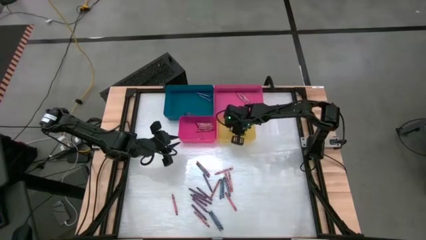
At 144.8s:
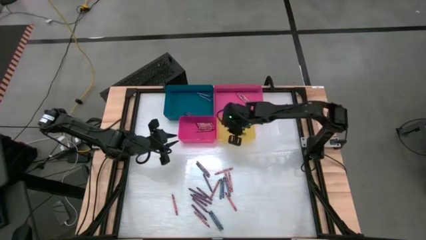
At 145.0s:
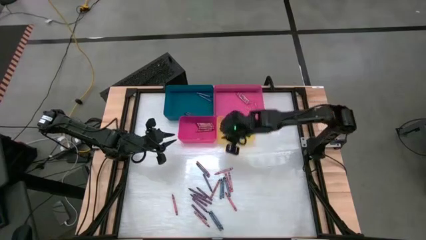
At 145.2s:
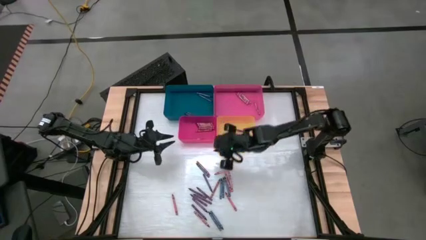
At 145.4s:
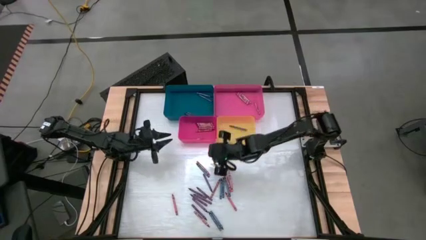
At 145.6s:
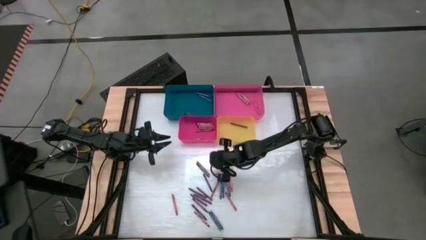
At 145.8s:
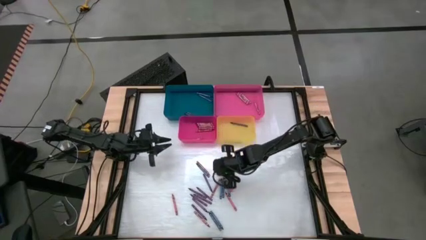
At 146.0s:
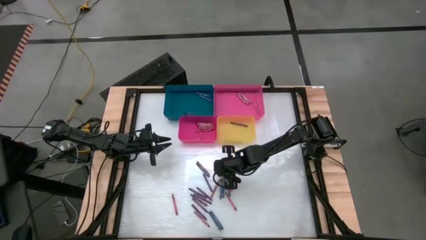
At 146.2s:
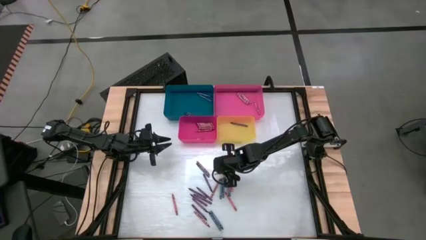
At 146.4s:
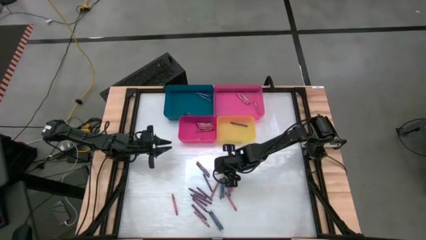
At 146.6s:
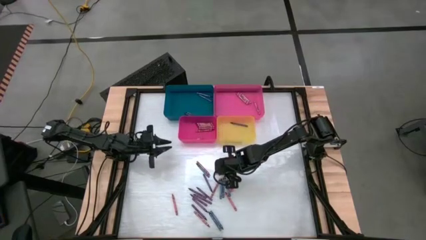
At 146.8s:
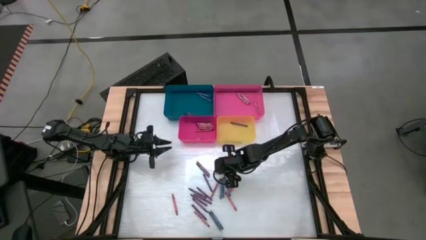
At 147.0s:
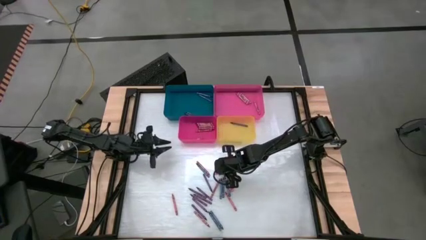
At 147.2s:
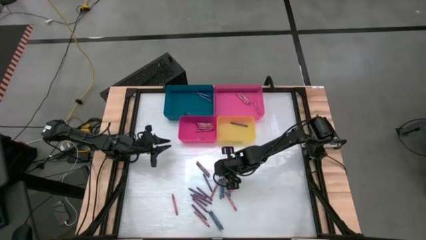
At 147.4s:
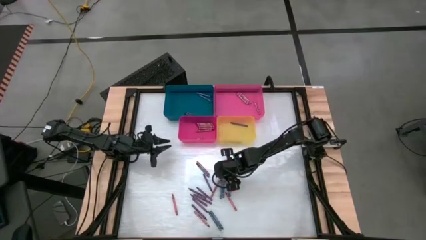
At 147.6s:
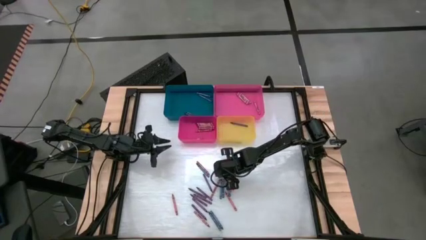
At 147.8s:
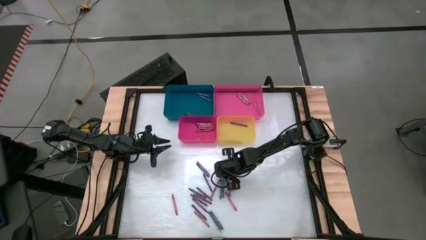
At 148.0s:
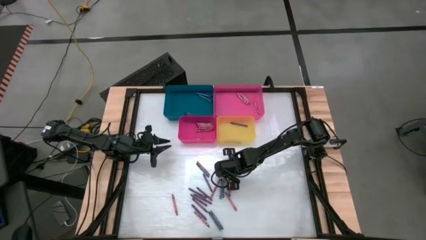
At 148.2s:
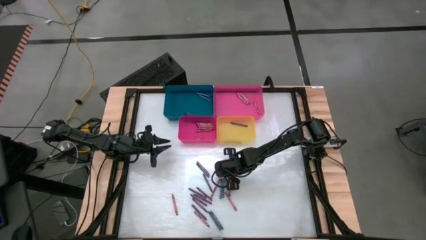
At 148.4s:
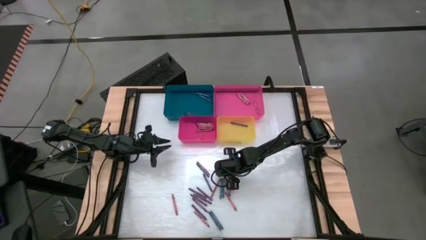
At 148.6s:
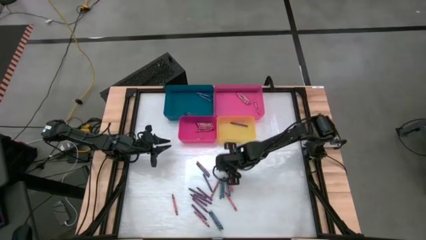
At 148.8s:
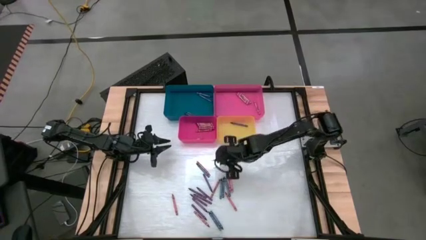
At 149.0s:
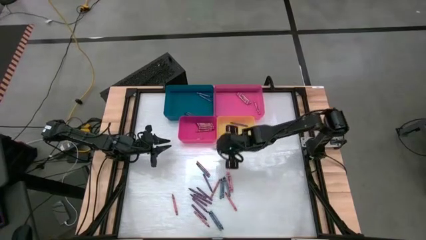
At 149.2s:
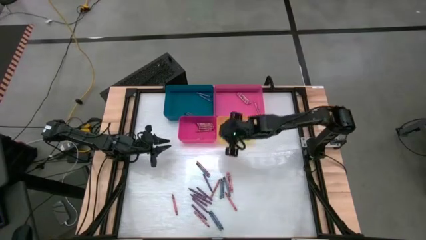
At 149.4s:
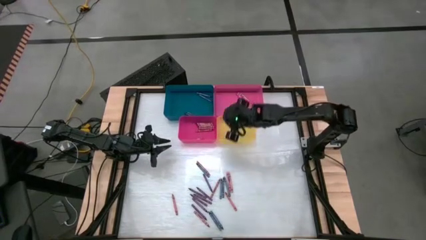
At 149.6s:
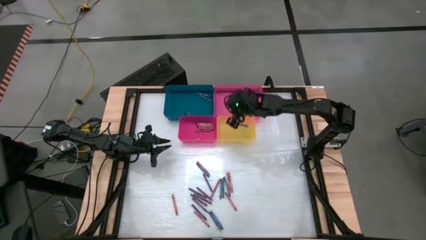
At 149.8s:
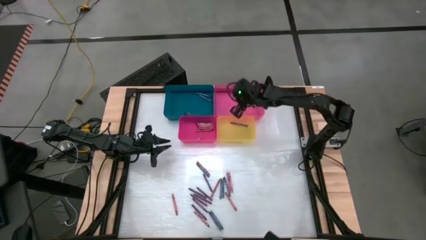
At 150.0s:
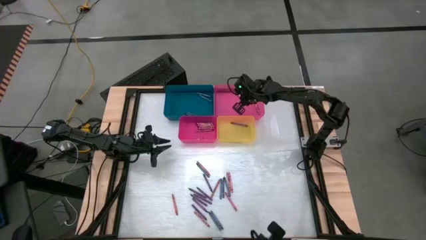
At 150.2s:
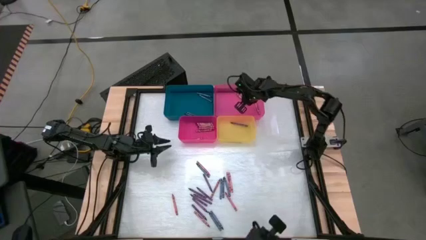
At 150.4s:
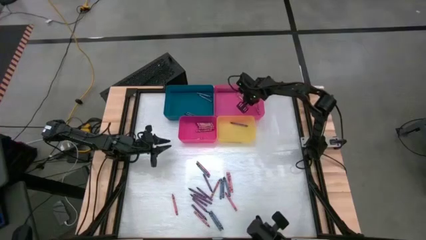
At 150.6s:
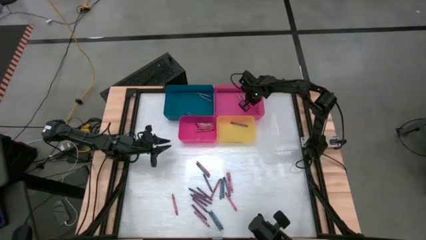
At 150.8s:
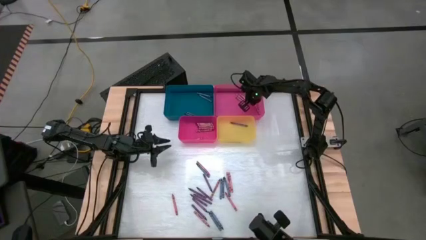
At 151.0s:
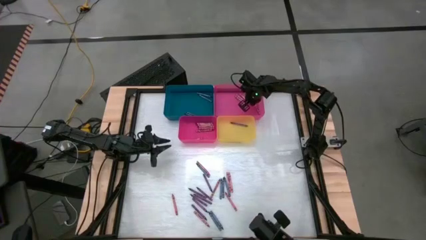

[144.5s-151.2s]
Task: Sort crayons
Put the pink crayon into the pink bin

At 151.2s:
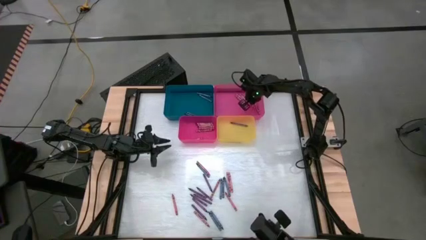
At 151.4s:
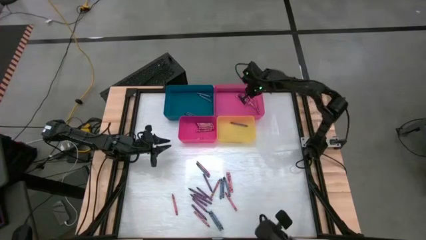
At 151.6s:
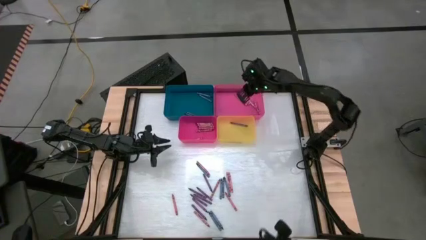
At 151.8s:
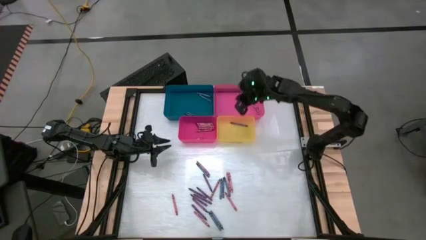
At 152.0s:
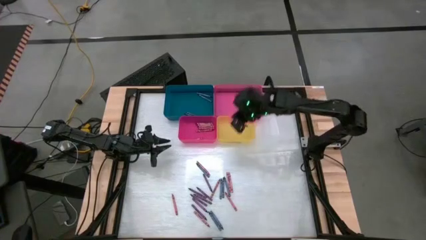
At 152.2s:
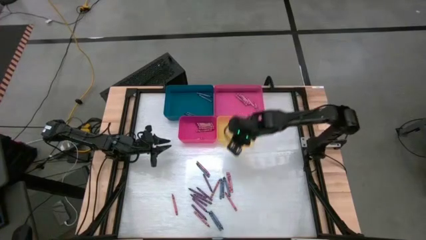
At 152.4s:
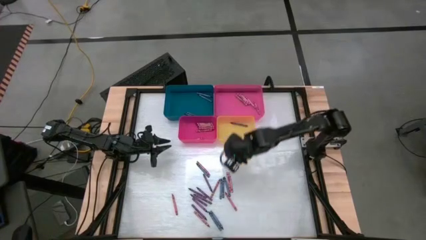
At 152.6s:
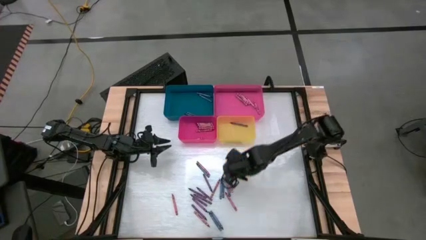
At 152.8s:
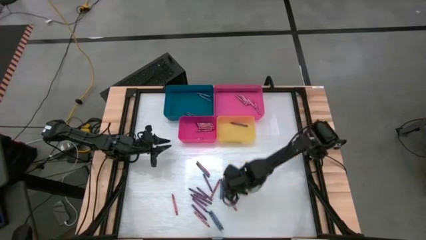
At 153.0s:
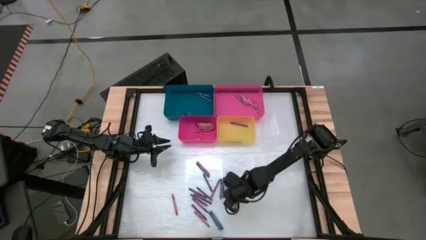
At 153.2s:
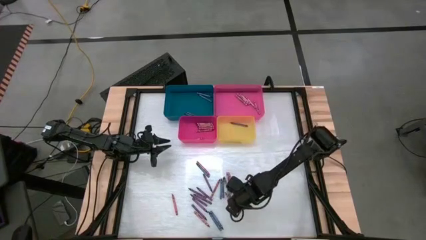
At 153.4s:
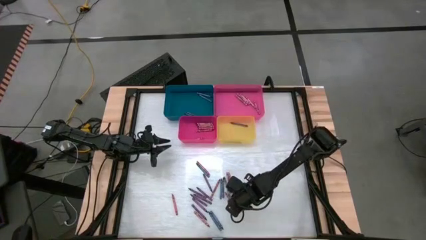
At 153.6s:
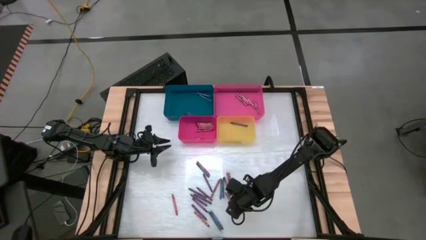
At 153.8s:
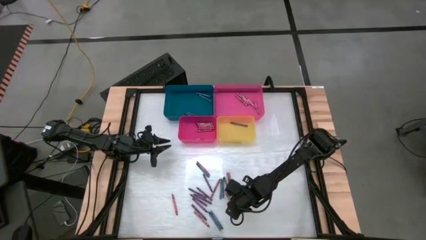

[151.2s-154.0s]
Put the red crayon into the red bin

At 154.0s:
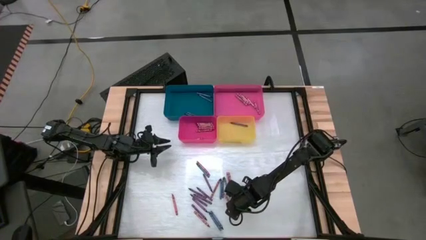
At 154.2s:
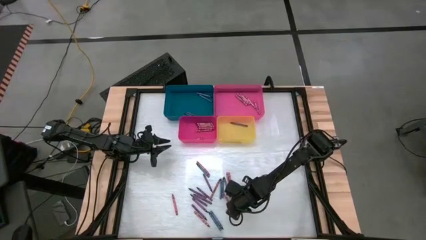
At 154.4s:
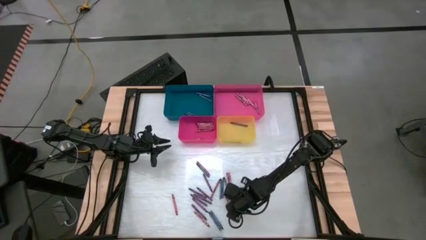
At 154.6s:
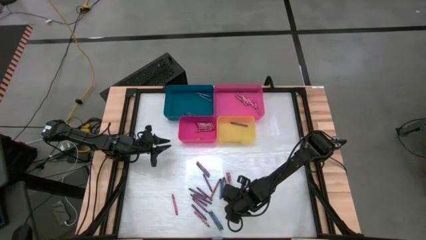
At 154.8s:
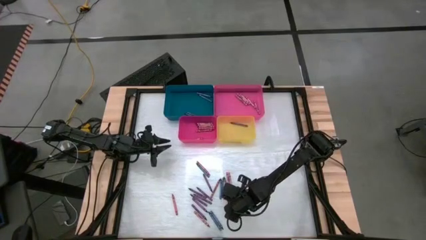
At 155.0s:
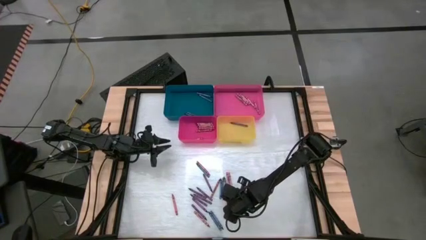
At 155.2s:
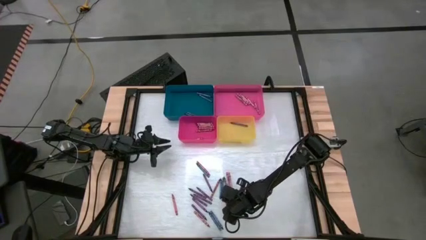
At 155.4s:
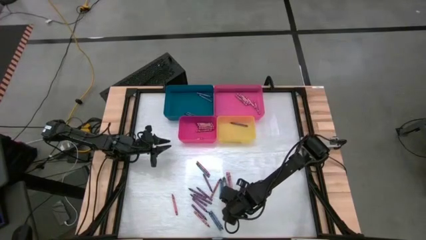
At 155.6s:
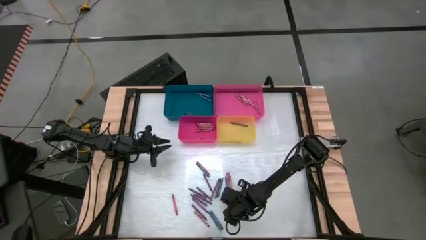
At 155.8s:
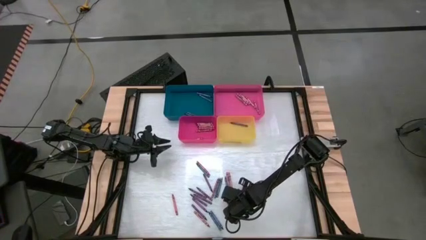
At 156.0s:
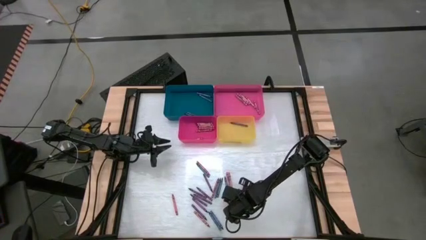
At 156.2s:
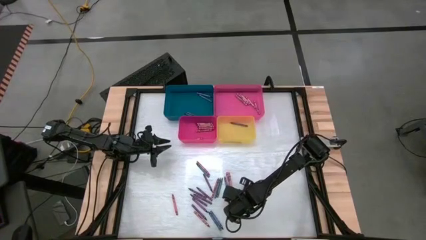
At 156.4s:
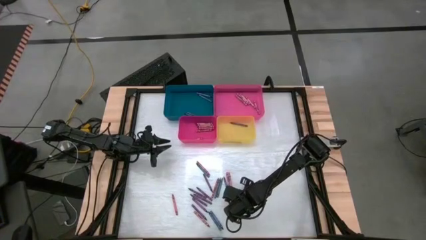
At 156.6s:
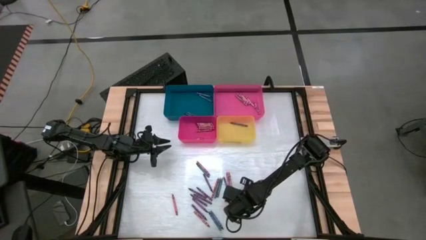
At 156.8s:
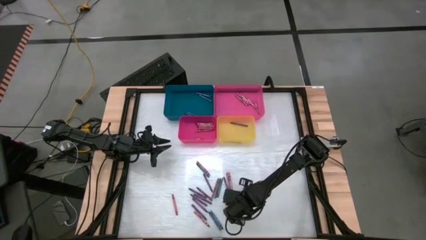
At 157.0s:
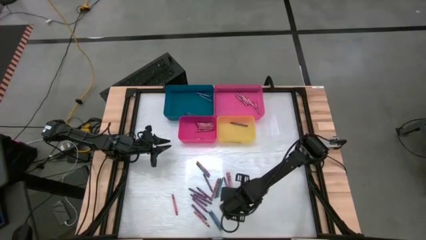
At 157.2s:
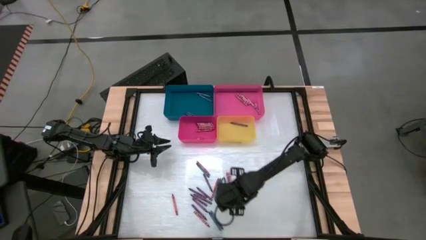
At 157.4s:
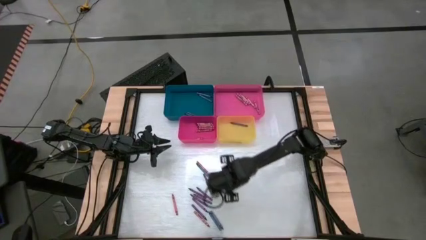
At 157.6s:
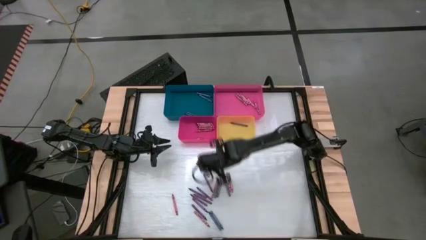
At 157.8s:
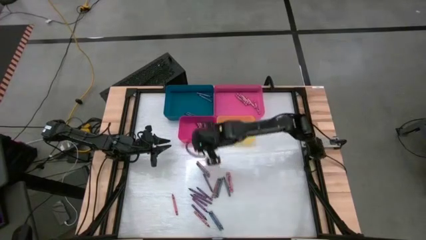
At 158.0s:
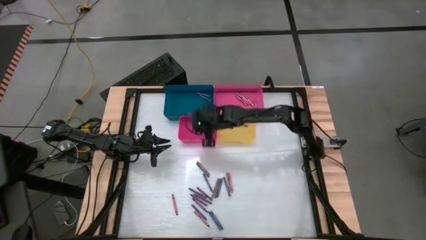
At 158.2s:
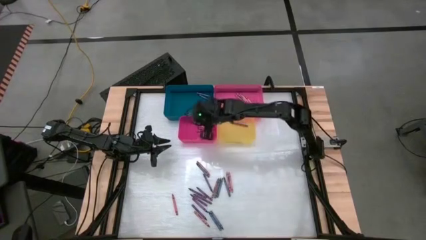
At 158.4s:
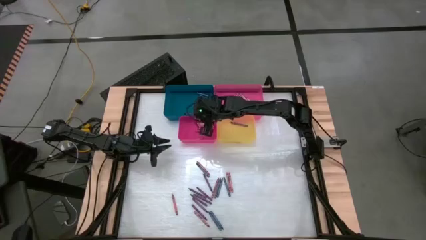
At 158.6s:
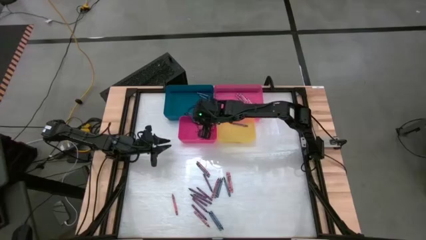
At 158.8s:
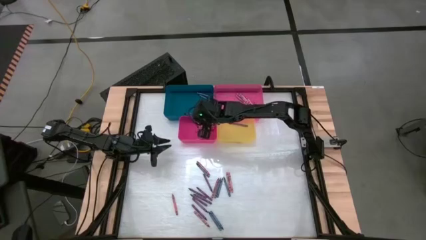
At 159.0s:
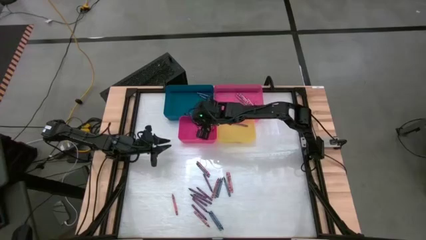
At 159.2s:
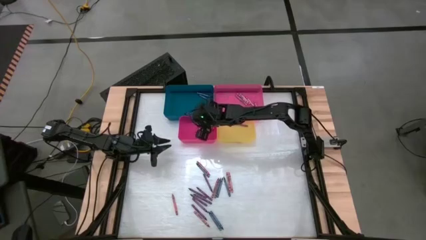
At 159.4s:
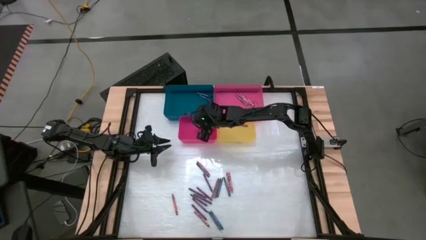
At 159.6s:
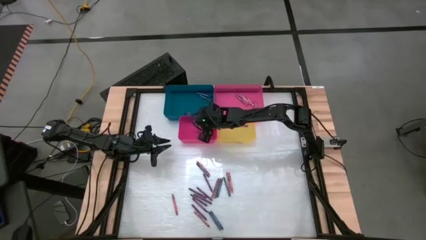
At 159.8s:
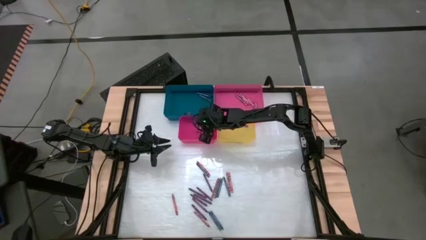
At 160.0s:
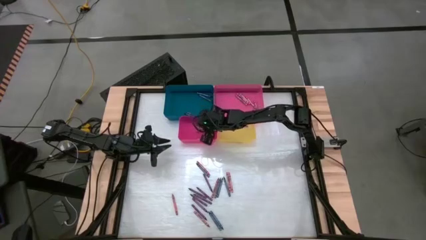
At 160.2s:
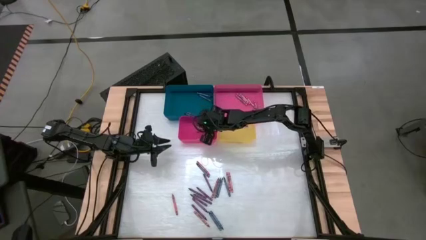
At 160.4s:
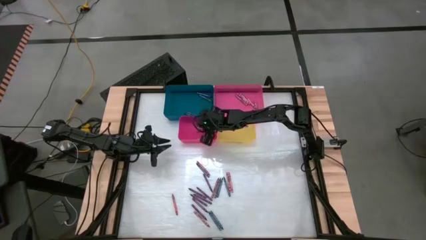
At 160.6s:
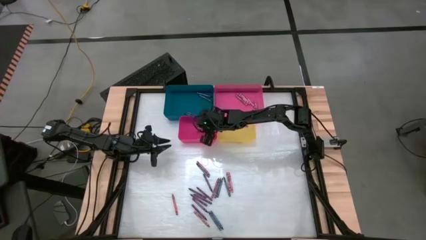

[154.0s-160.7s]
Put the red crayon into the red bin
